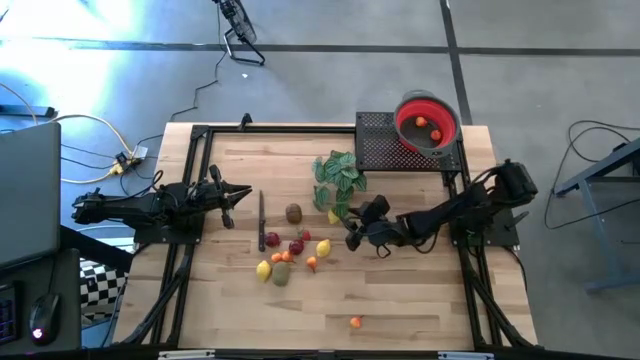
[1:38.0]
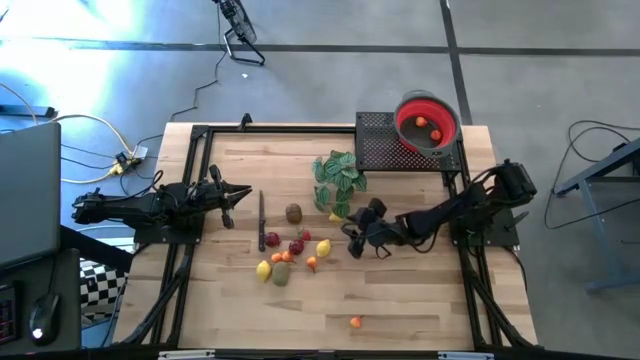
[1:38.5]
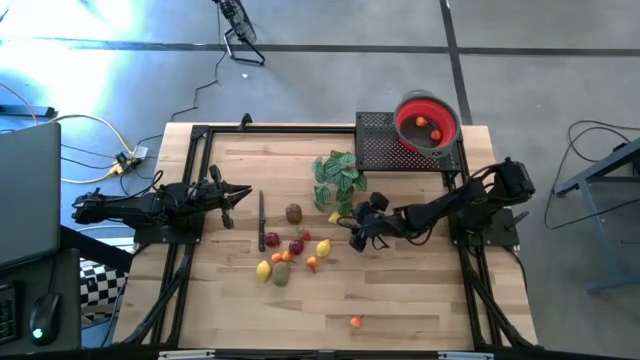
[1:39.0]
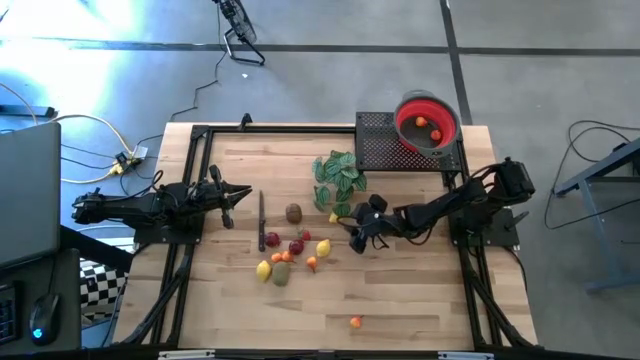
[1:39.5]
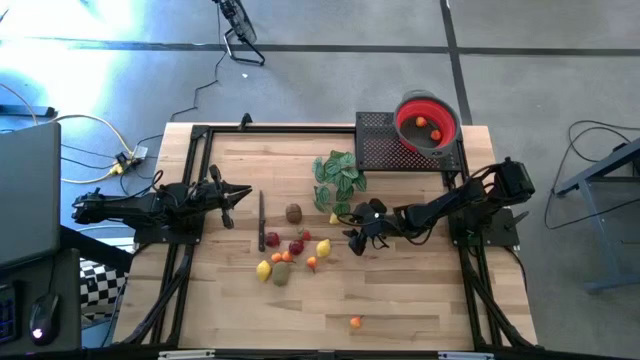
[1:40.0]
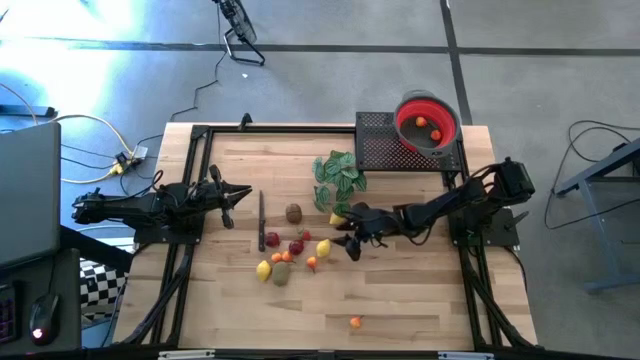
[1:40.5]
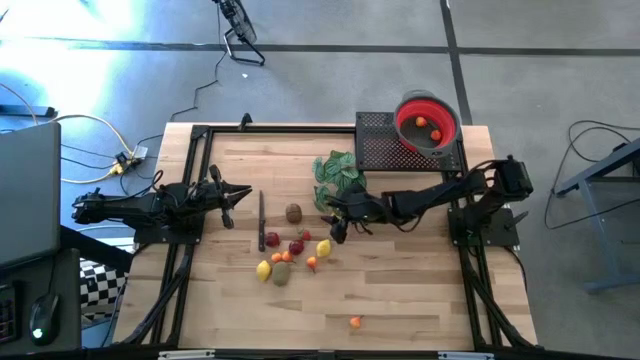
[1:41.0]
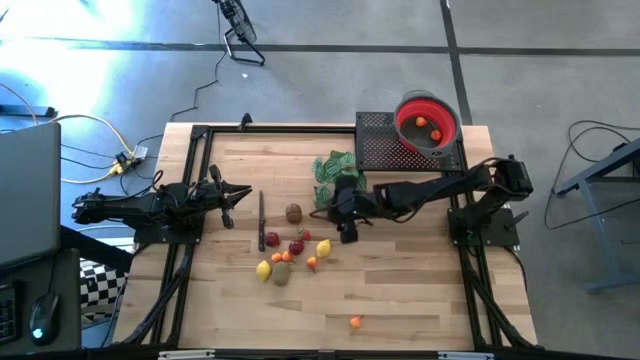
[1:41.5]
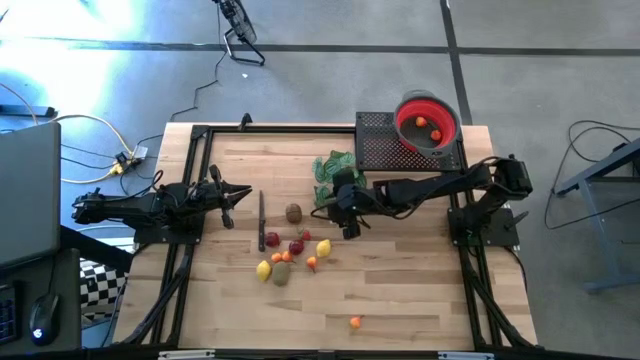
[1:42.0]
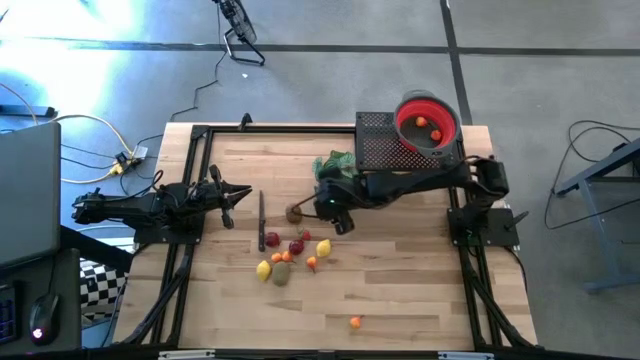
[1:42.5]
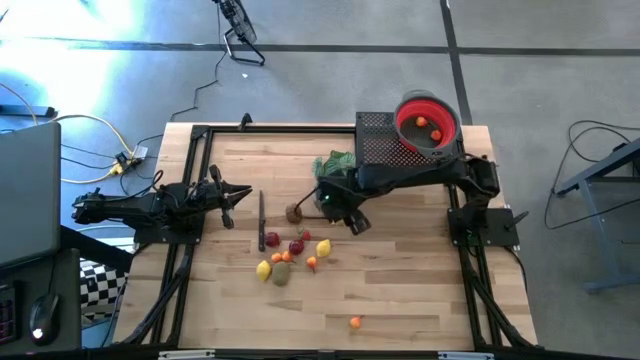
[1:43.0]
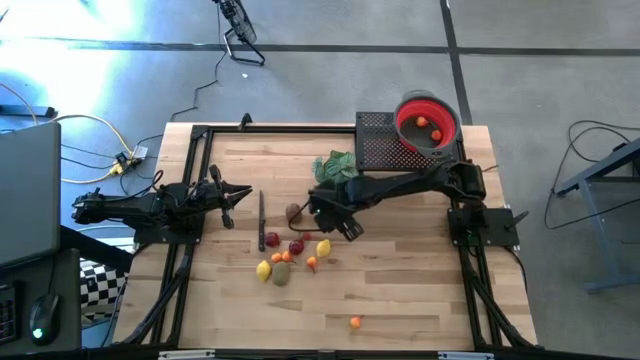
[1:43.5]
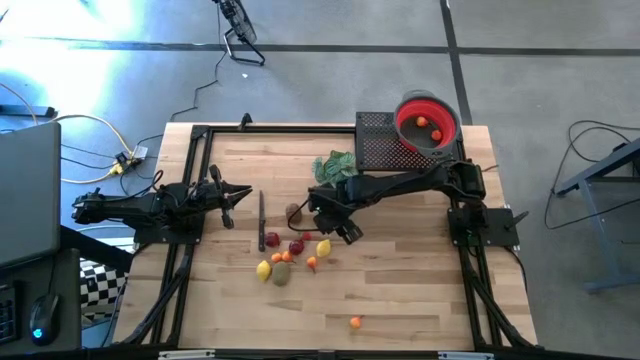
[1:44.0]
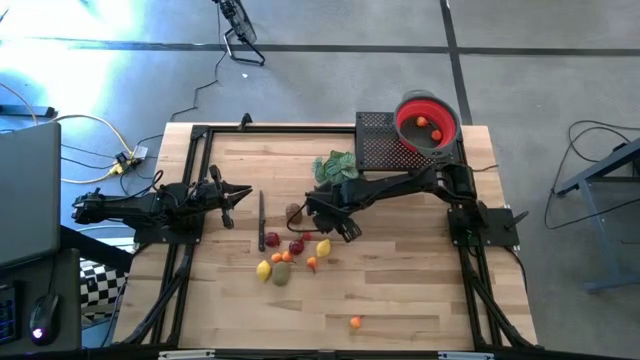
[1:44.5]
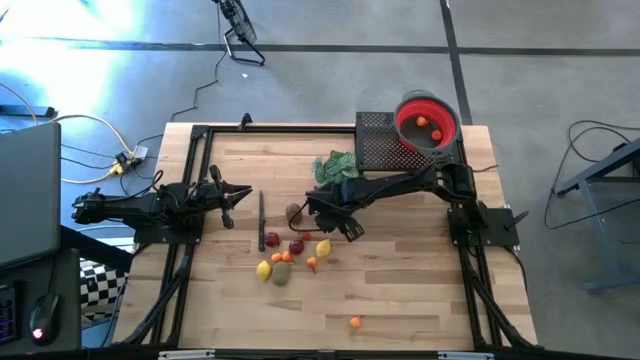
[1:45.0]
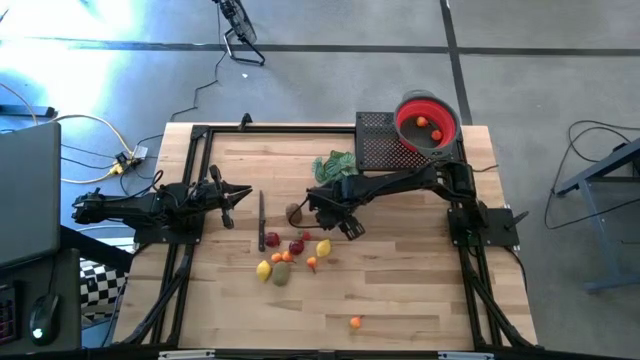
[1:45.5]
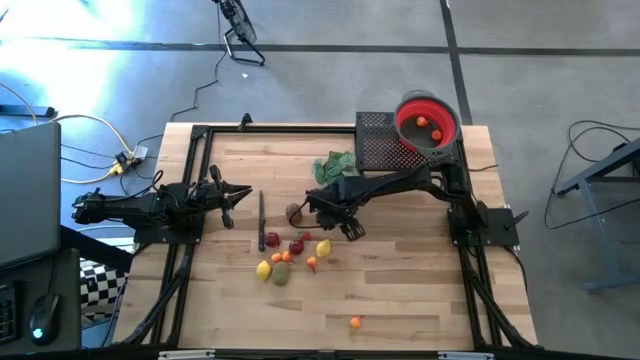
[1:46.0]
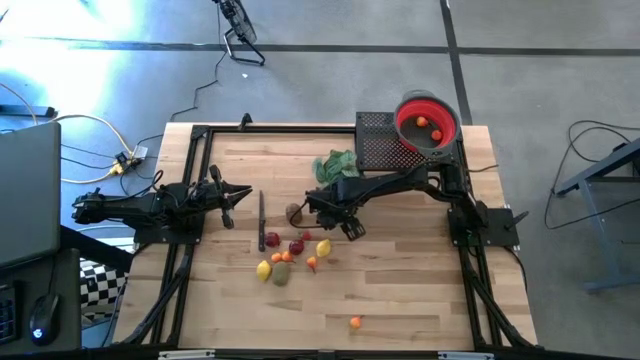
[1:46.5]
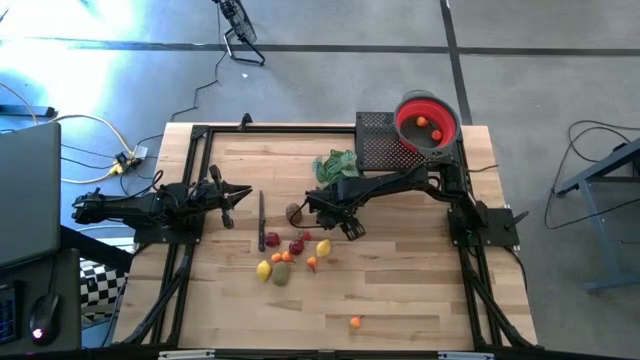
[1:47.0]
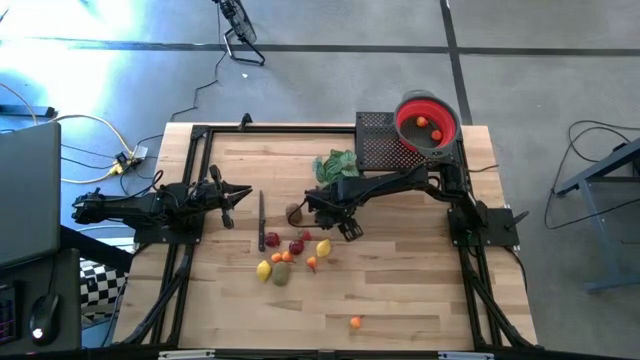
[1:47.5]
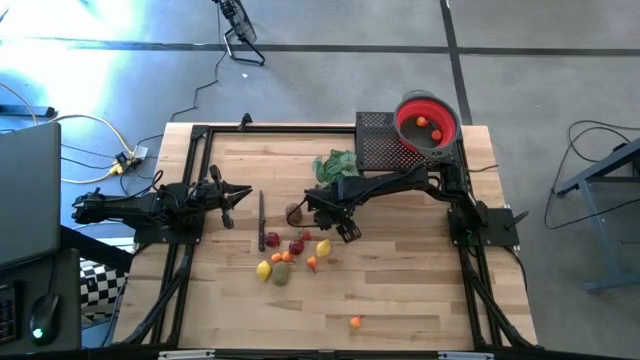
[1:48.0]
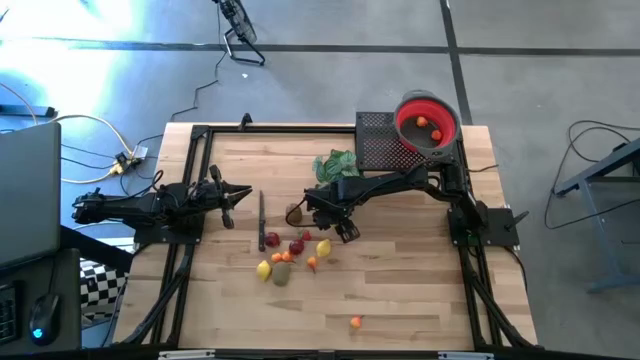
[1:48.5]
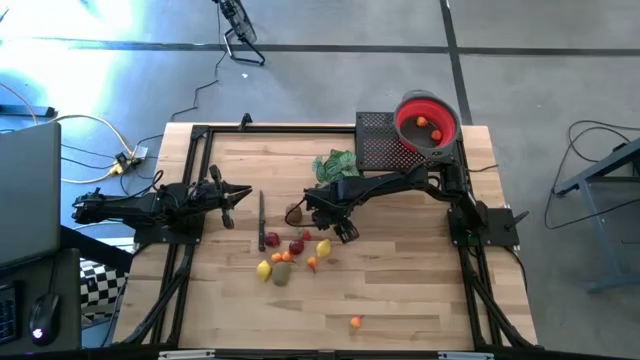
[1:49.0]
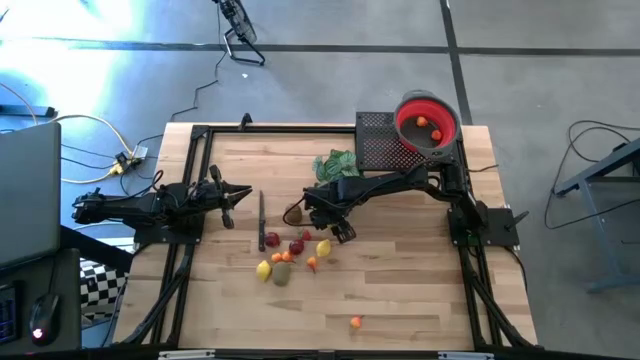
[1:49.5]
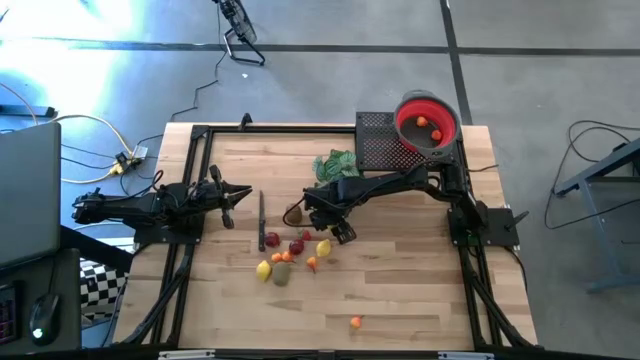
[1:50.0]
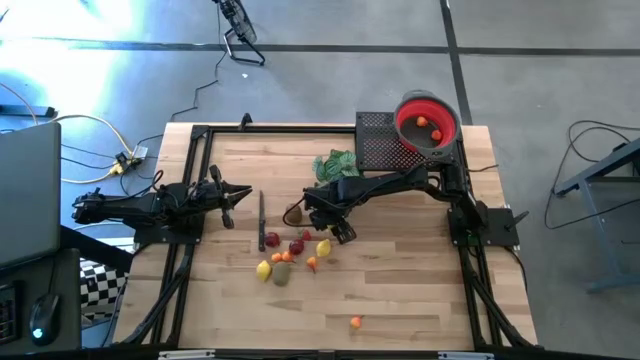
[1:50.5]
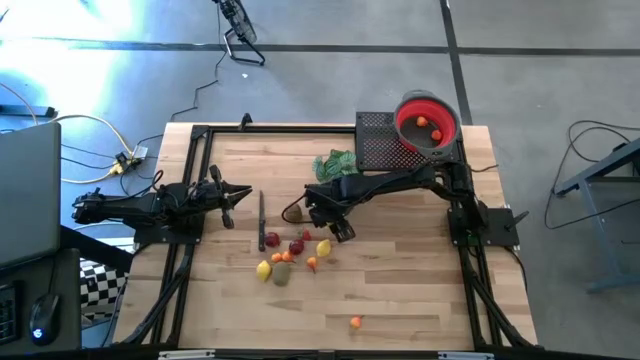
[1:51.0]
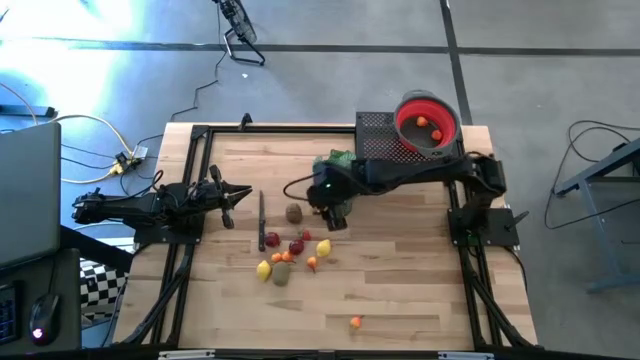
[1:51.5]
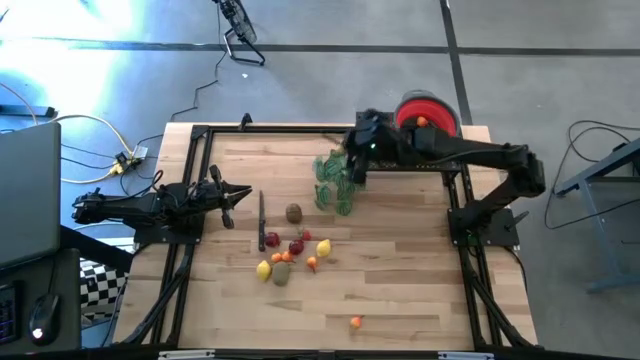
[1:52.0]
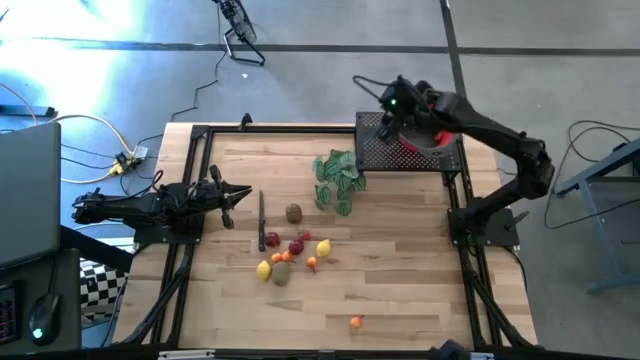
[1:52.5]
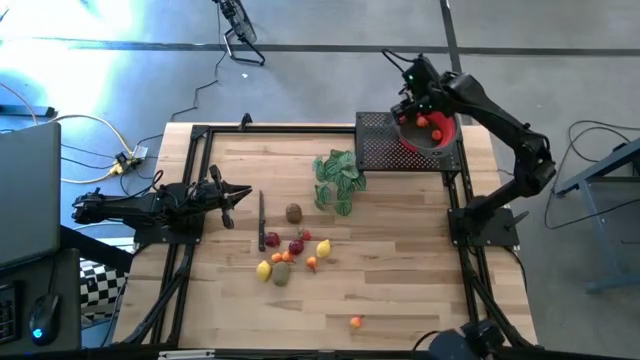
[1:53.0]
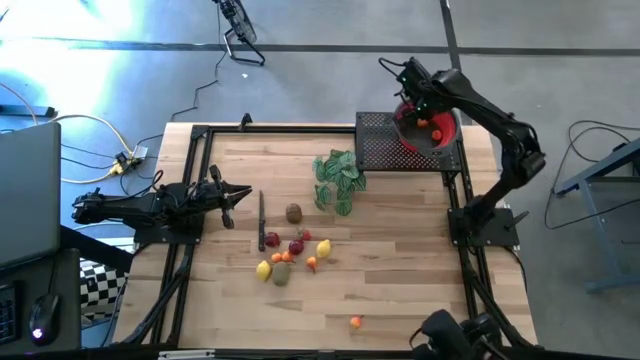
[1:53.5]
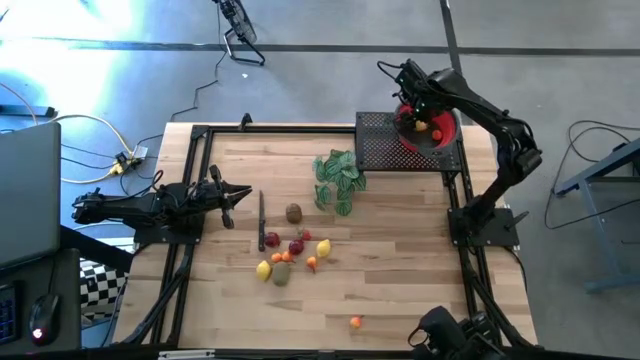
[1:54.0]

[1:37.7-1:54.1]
Task: Pick & Place Fruit
Put the lemon into the red colander

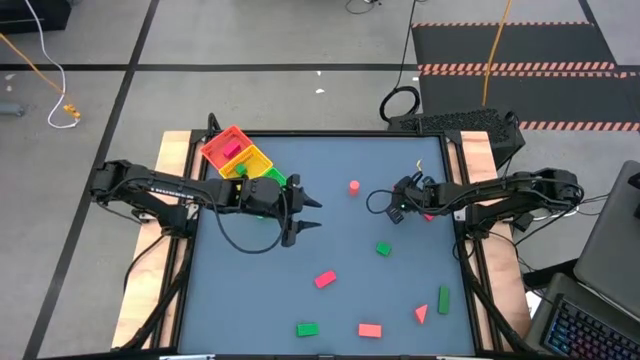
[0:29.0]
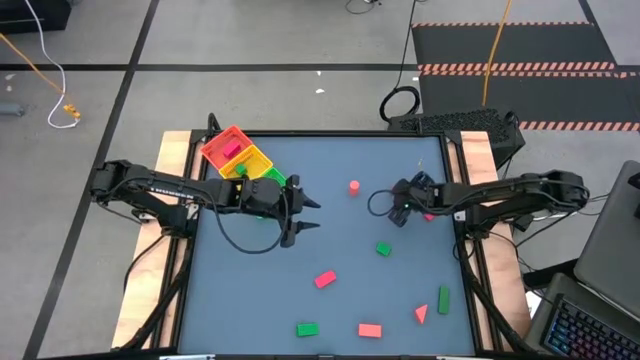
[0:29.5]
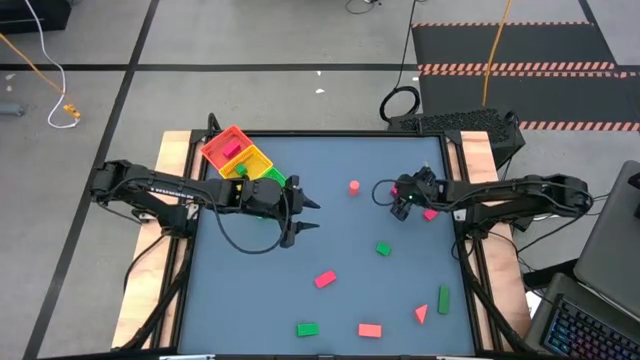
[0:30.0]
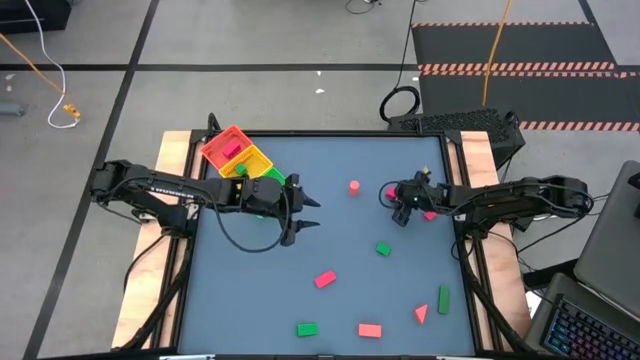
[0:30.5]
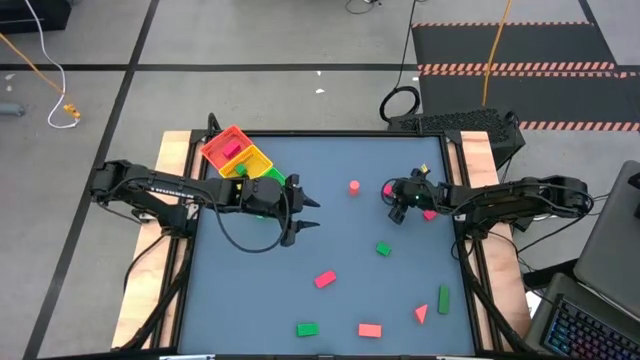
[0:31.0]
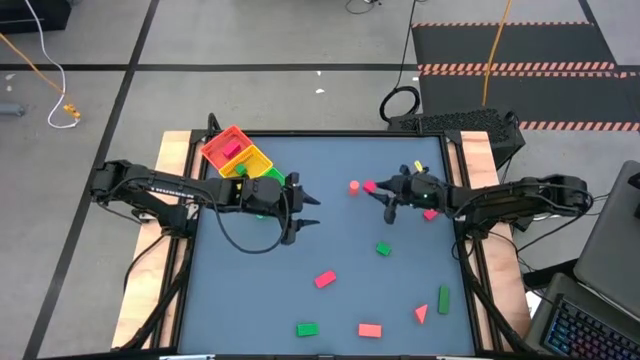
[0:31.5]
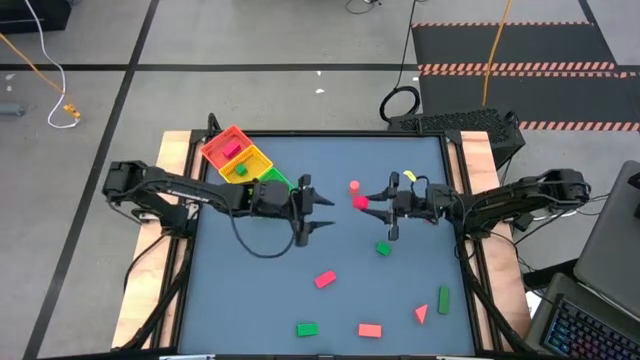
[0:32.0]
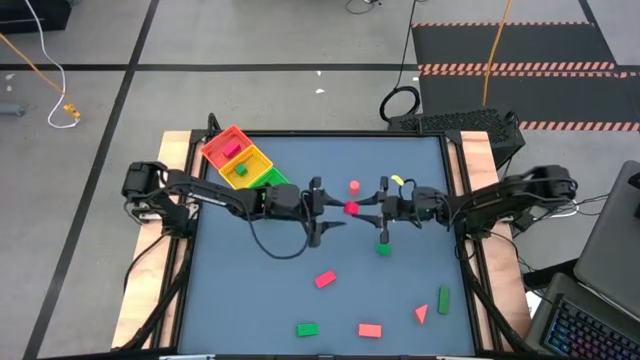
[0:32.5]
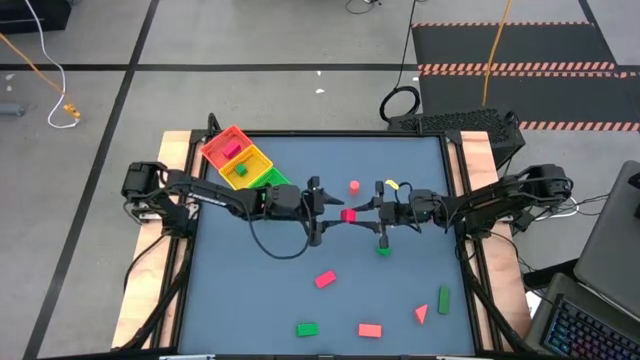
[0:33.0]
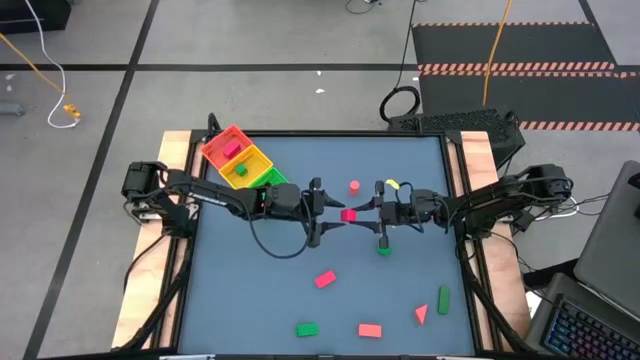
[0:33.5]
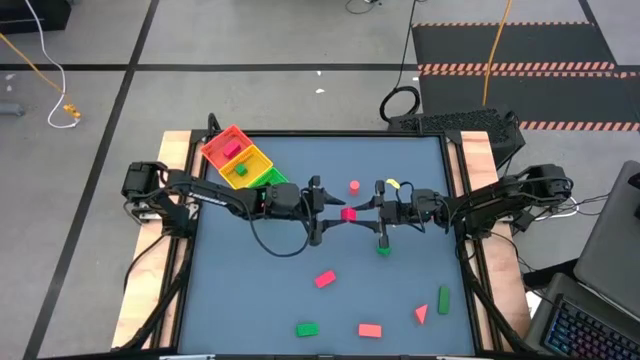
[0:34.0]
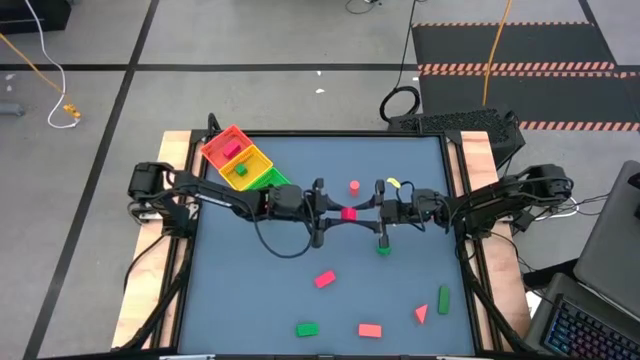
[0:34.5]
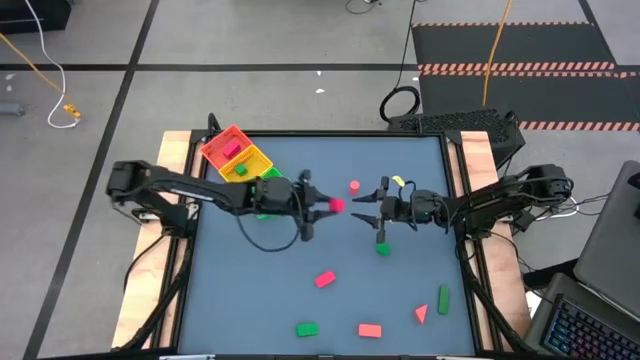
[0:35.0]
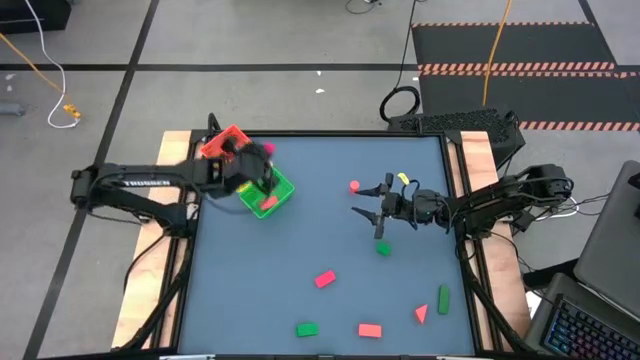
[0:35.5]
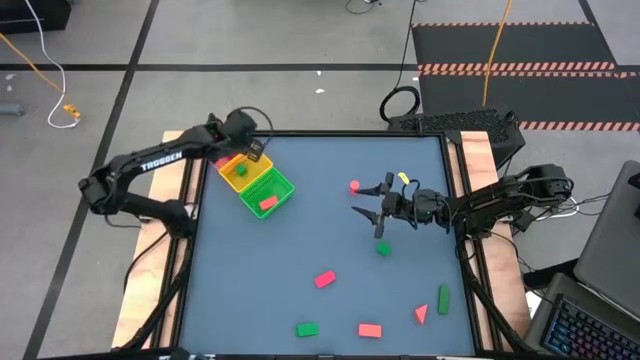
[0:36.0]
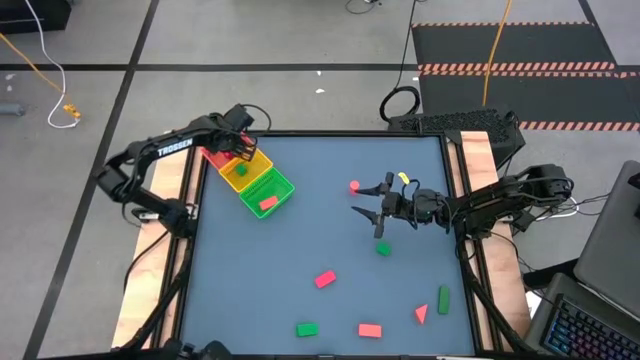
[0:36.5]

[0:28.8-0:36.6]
Task: Sort & place blocks by color
Put the red block into the orange basket
